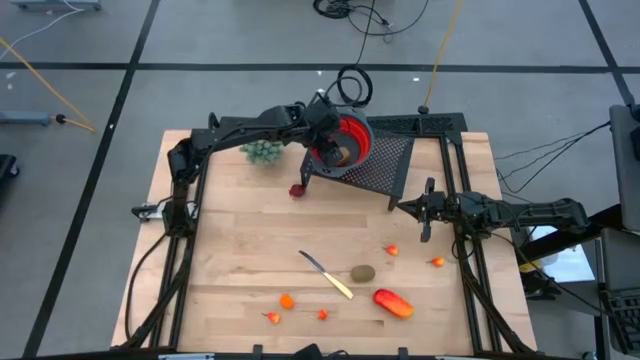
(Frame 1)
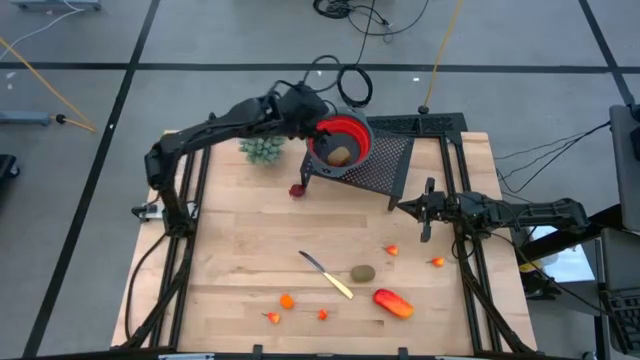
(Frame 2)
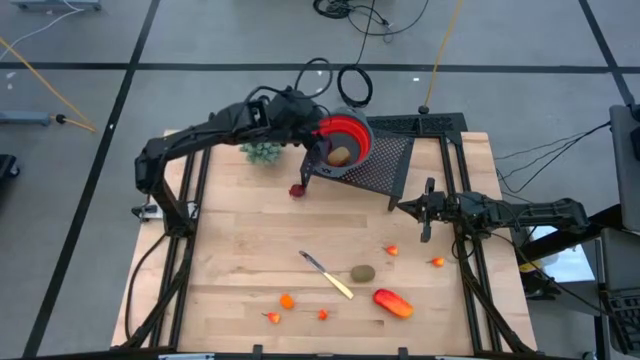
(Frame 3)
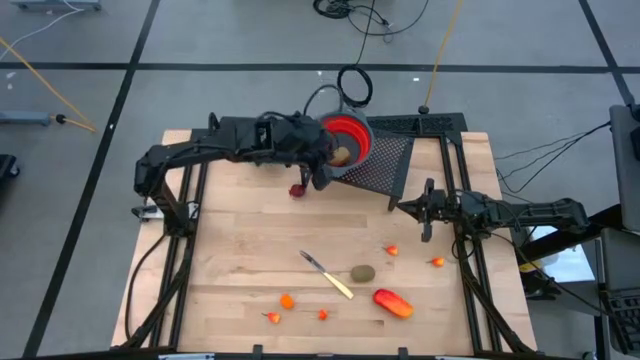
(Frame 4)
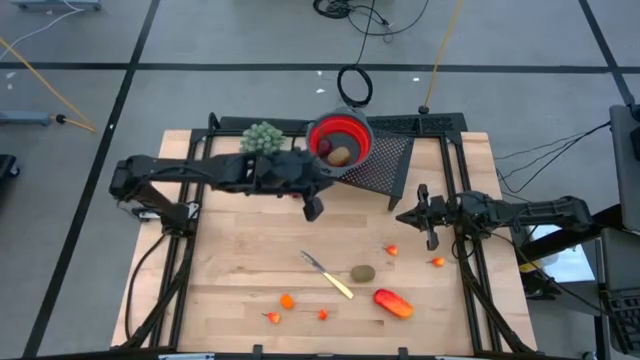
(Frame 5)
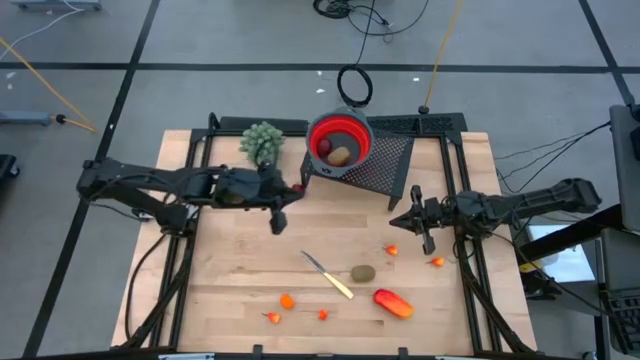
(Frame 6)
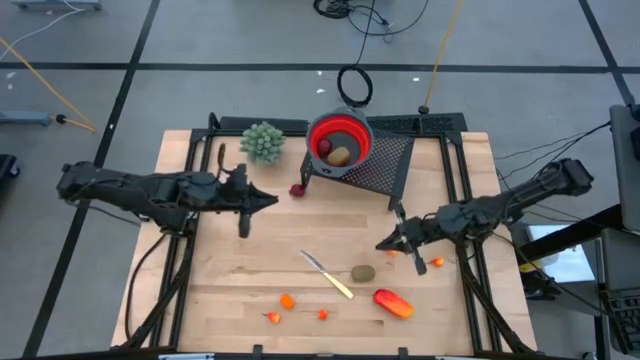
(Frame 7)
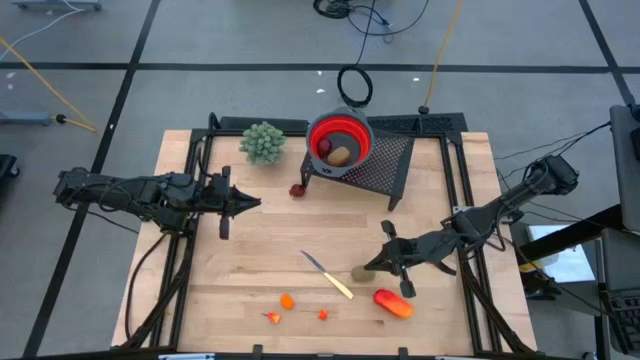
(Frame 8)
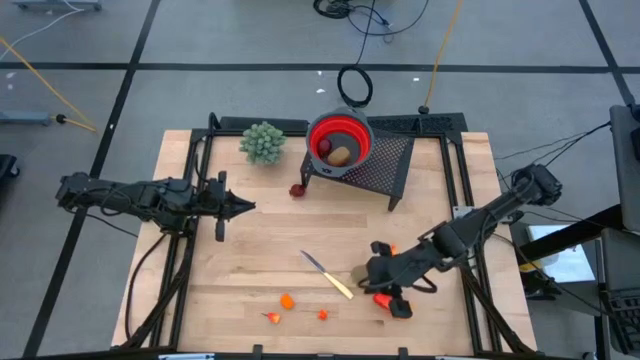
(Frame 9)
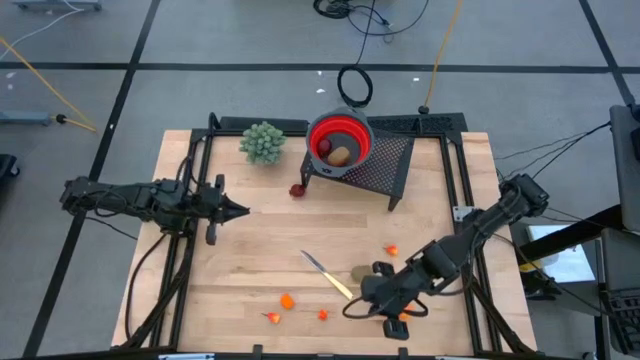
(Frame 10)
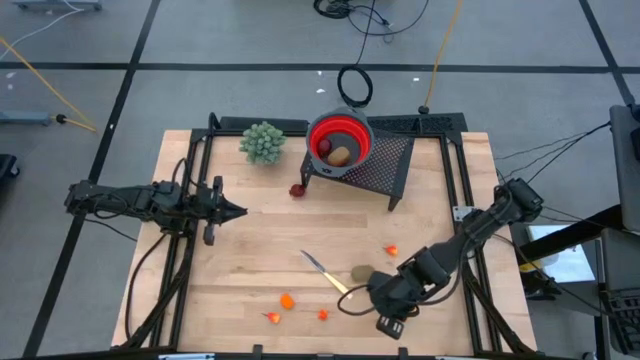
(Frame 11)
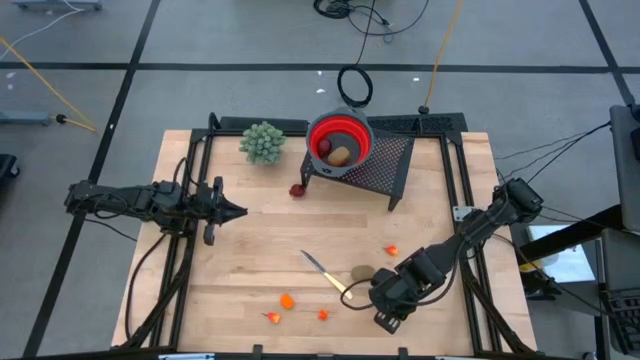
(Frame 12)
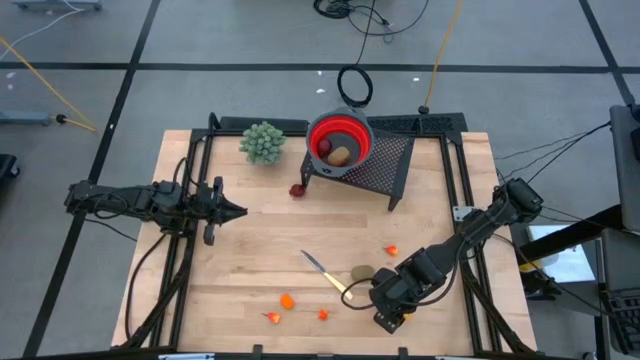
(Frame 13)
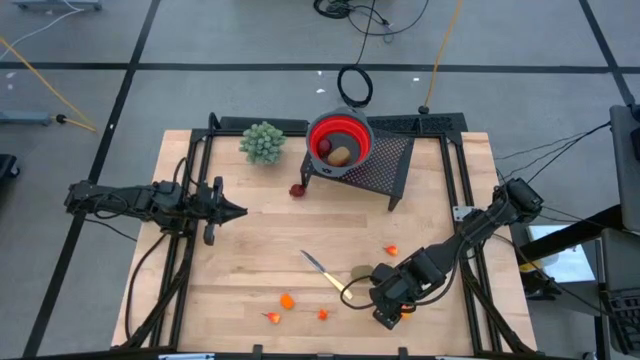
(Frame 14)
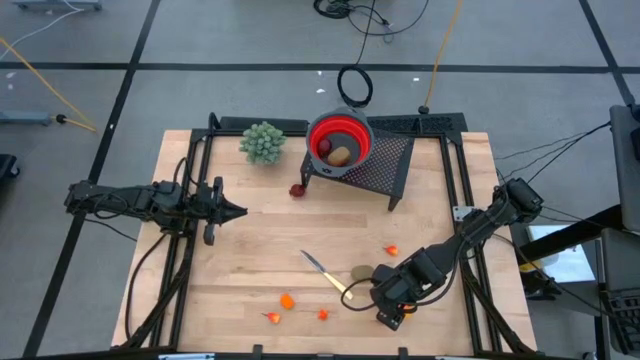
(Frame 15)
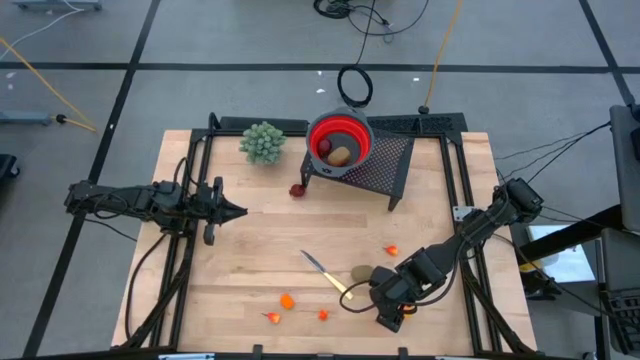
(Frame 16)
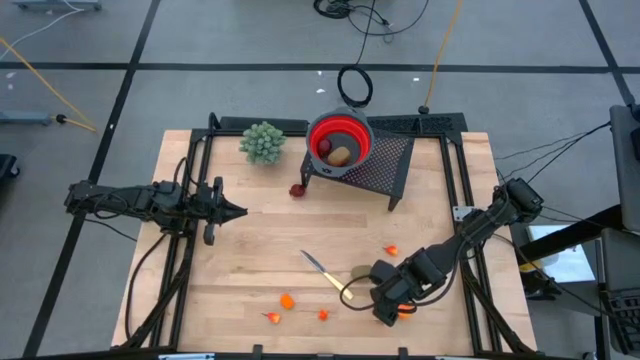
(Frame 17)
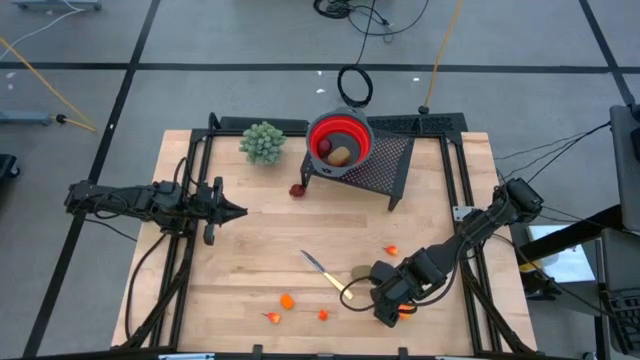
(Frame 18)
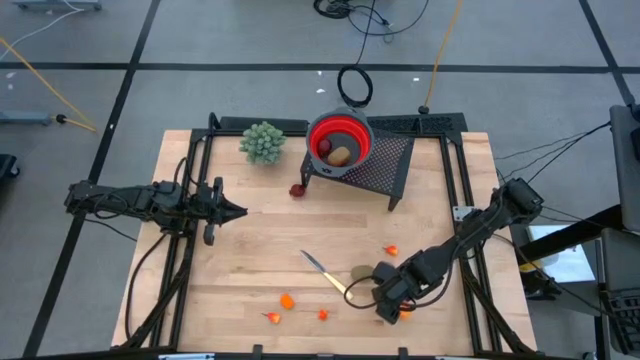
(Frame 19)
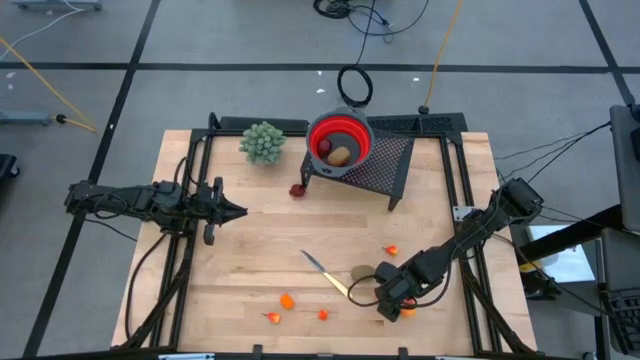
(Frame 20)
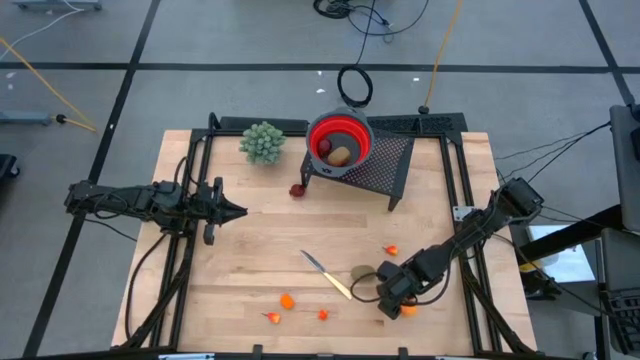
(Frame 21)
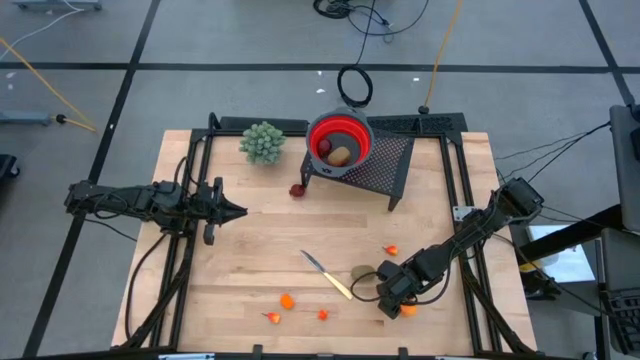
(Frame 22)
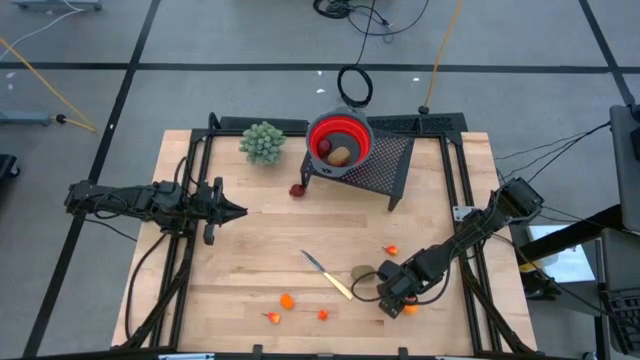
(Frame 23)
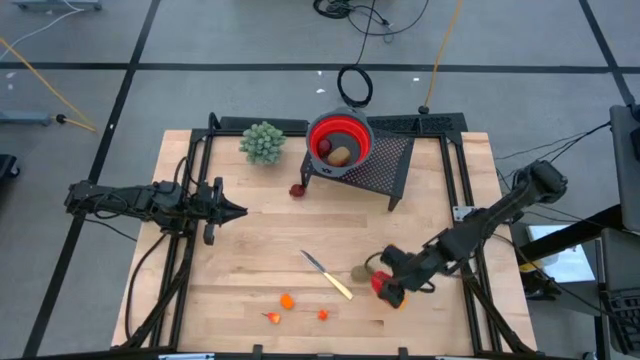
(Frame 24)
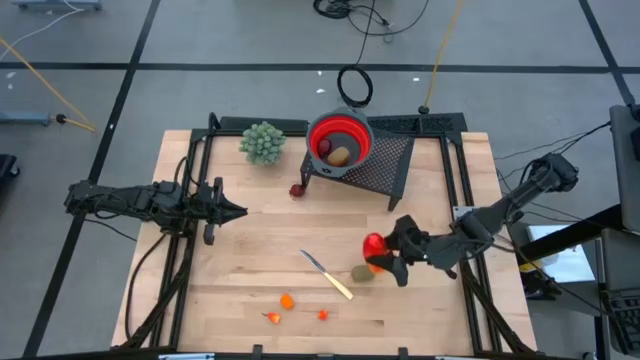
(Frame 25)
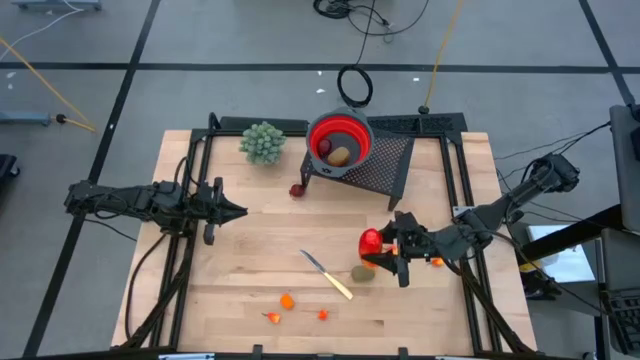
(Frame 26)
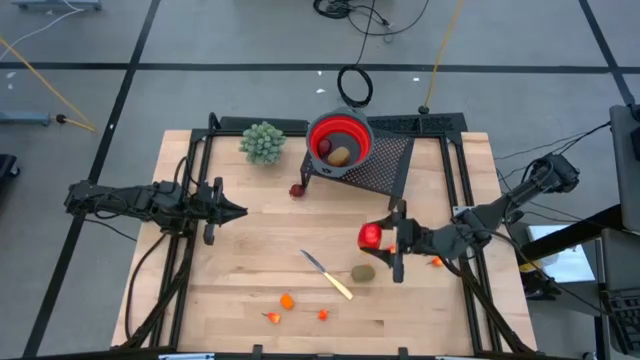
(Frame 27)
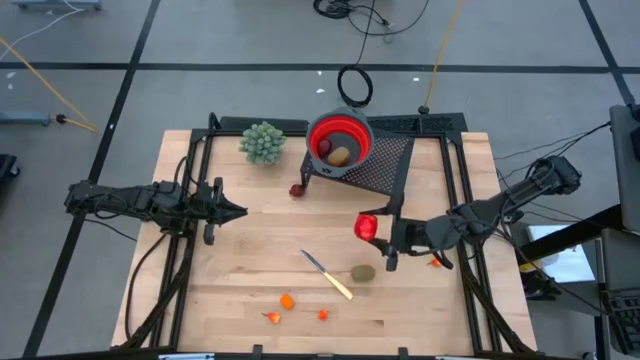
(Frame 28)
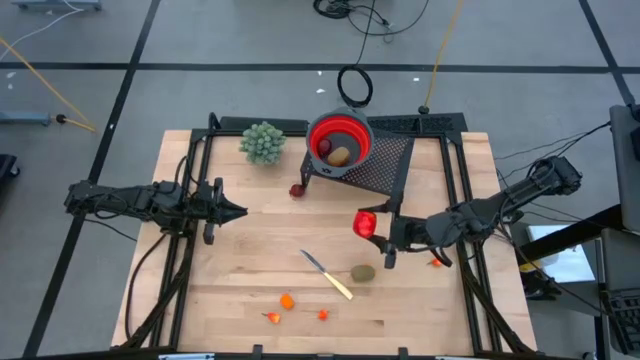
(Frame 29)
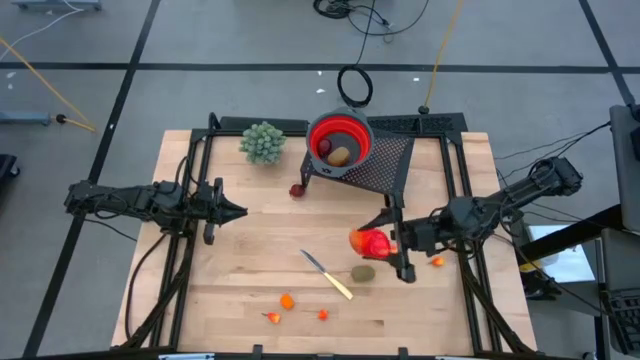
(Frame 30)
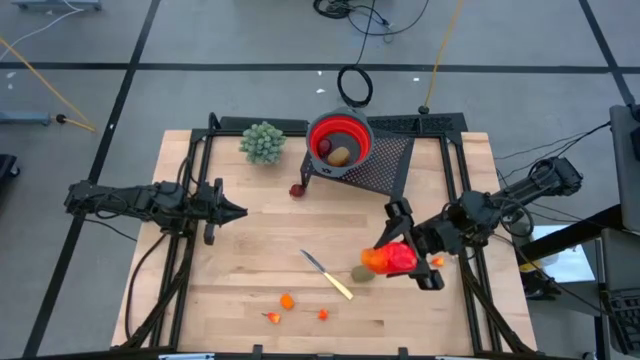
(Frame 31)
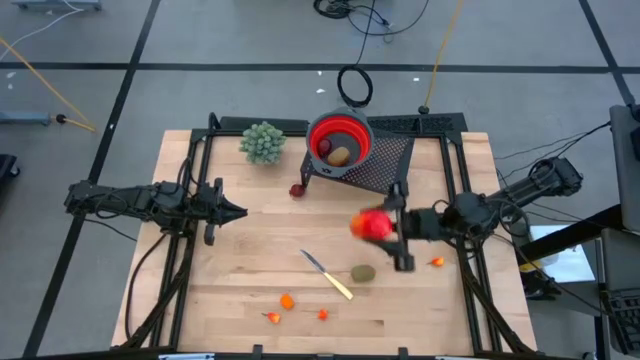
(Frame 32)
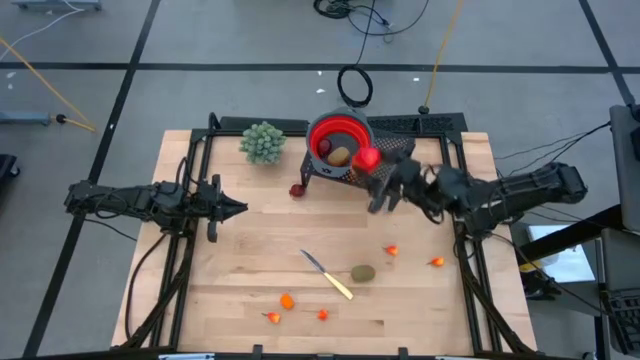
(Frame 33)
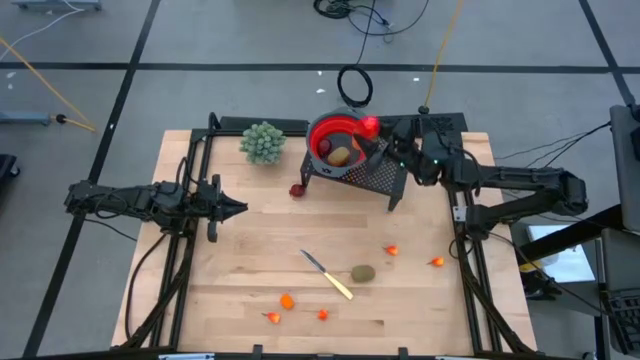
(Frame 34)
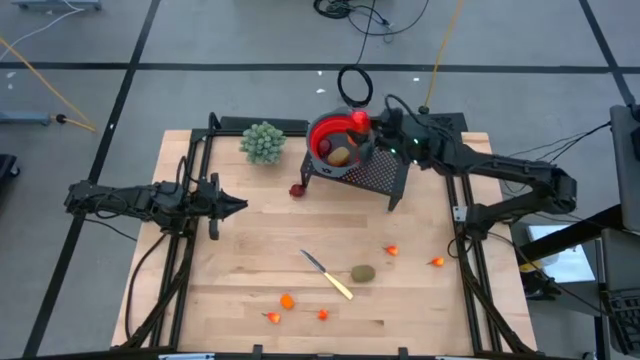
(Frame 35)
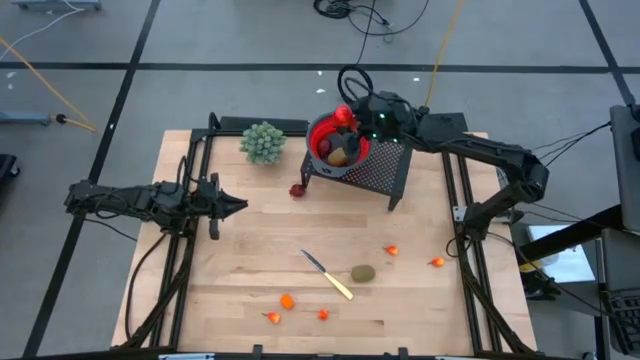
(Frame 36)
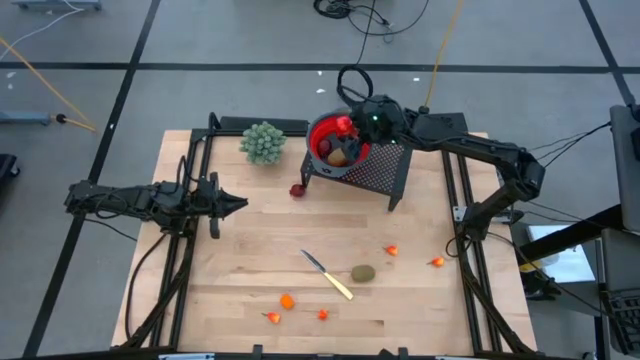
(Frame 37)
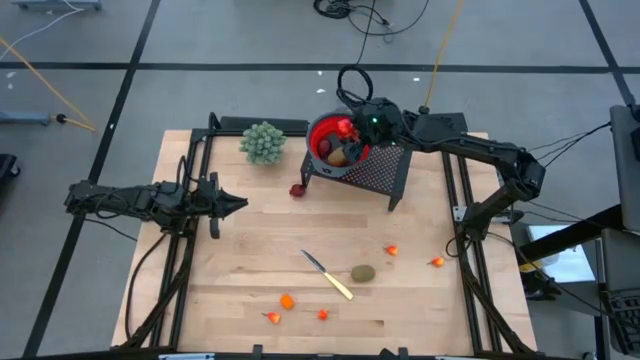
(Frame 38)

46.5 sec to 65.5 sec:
Task: Pick & Place Fruit
Put the red mango into the red strainer bowl on the shelf

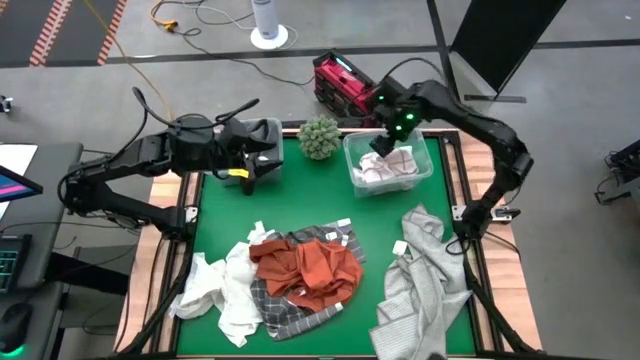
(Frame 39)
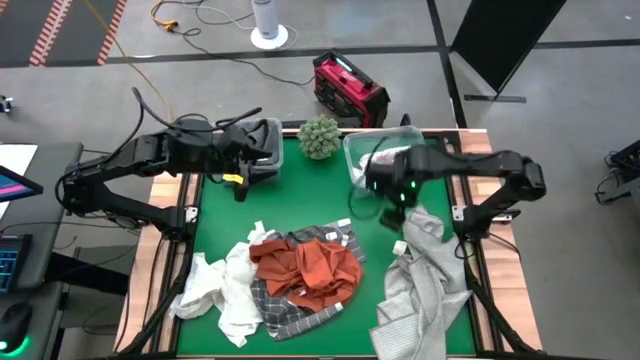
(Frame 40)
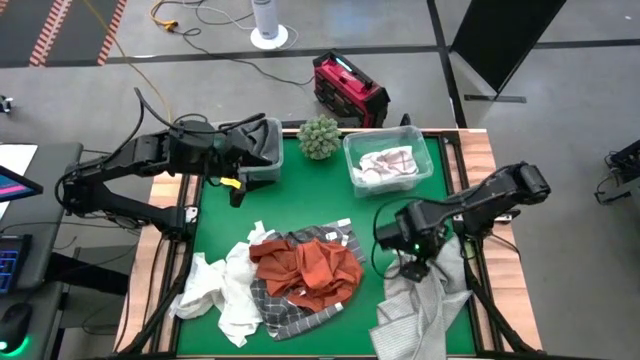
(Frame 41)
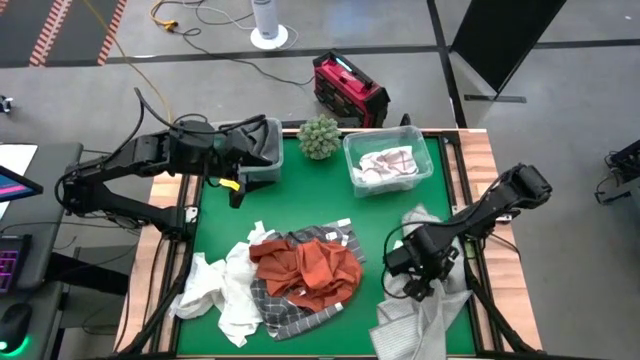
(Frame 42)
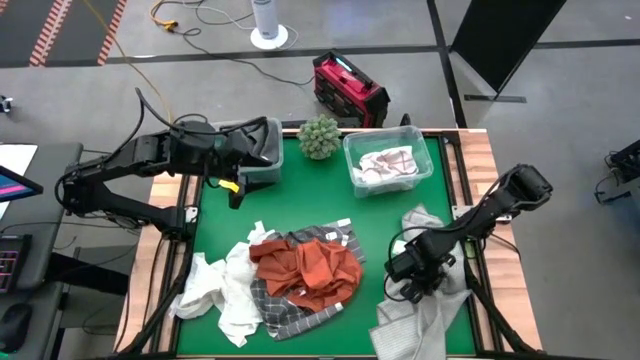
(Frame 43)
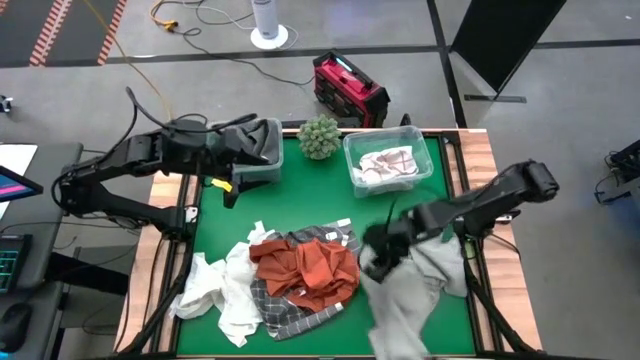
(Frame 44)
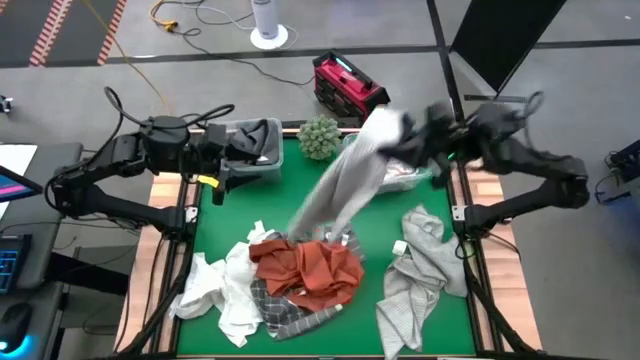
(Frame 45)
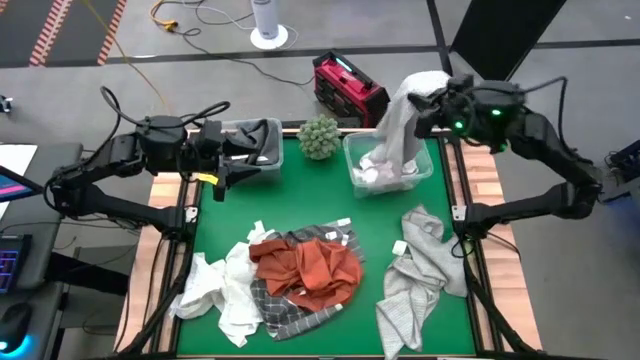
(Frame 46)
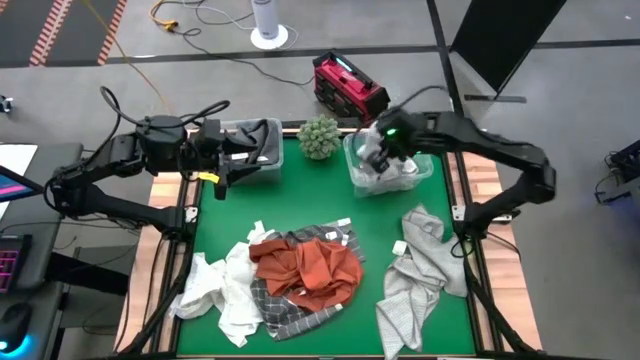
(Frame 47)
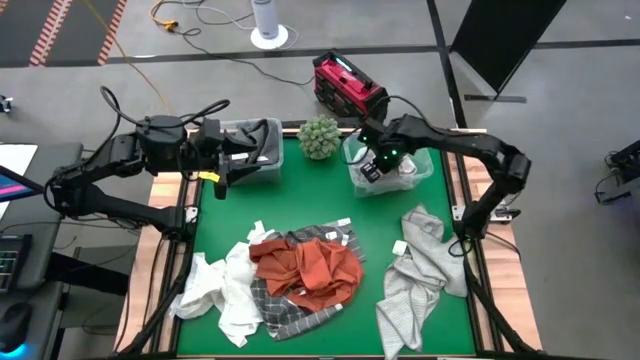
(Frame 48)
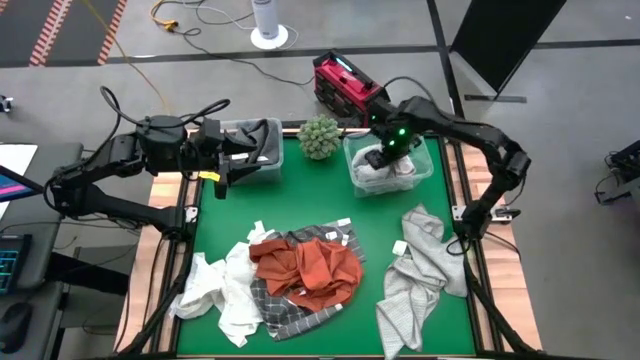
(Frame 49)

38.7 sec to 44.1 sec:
Task: Sort towels by color in basket
Put the gray towel into the right transparent bin
